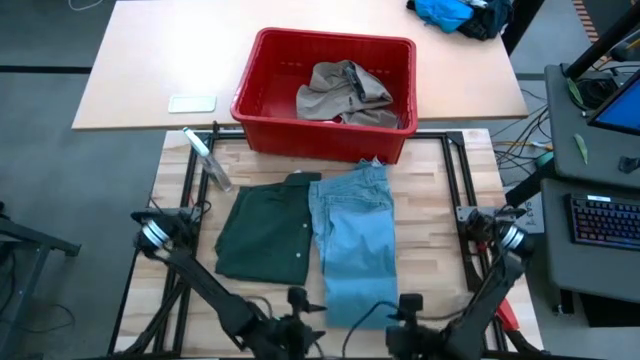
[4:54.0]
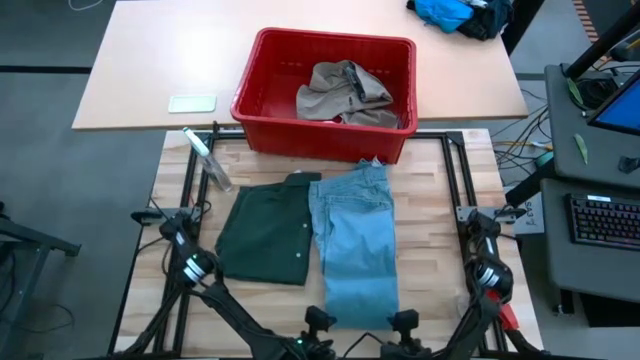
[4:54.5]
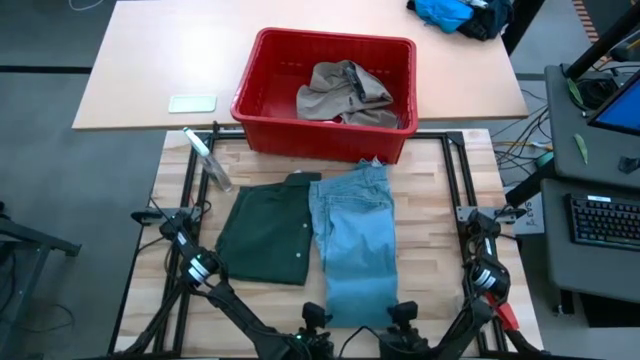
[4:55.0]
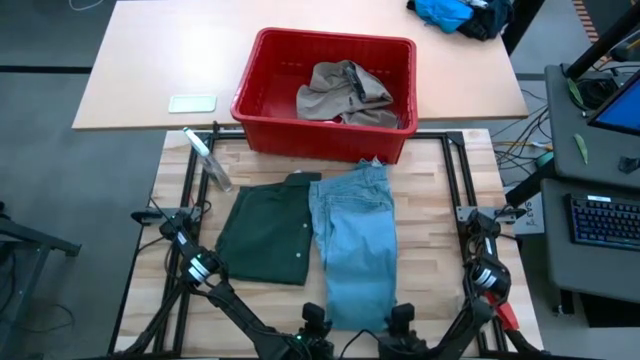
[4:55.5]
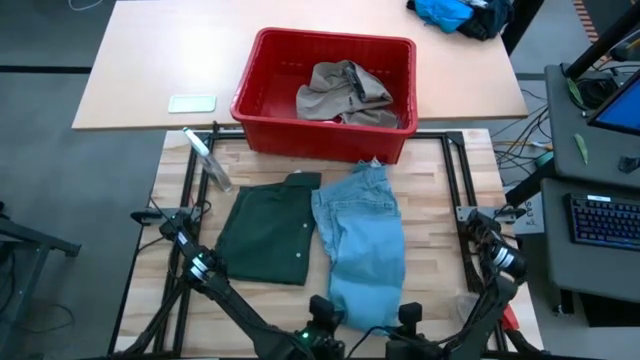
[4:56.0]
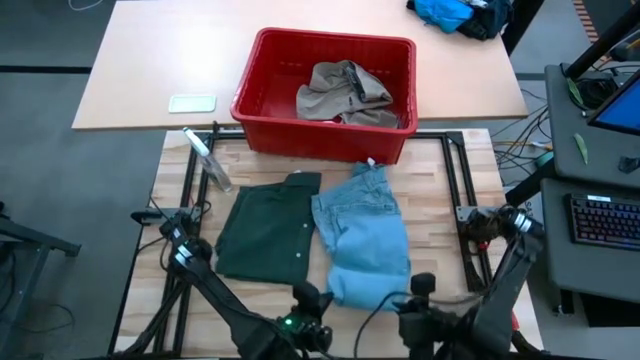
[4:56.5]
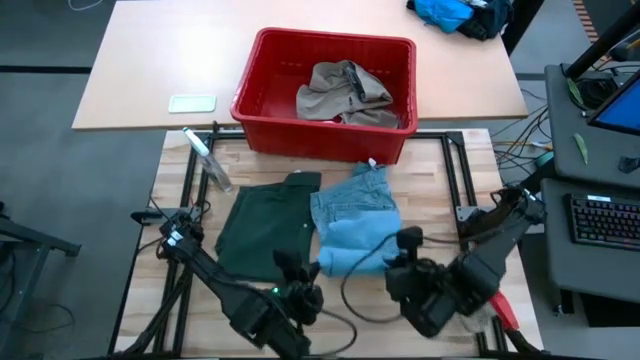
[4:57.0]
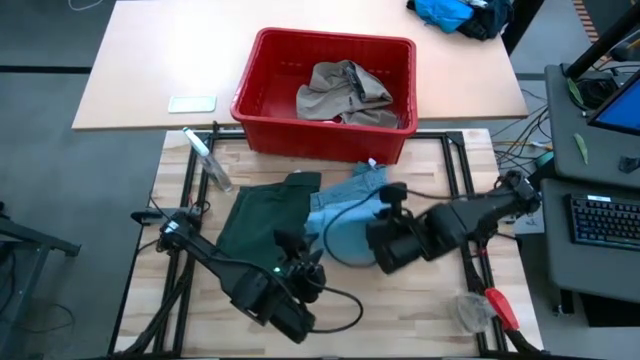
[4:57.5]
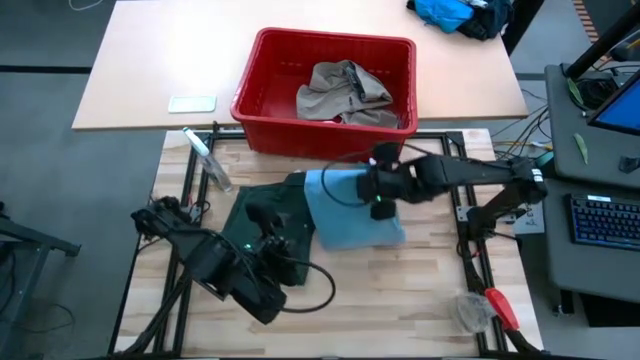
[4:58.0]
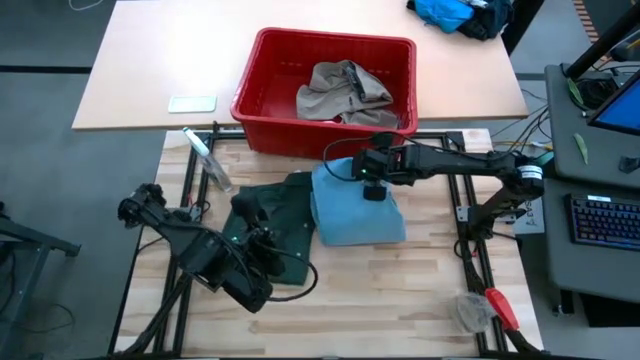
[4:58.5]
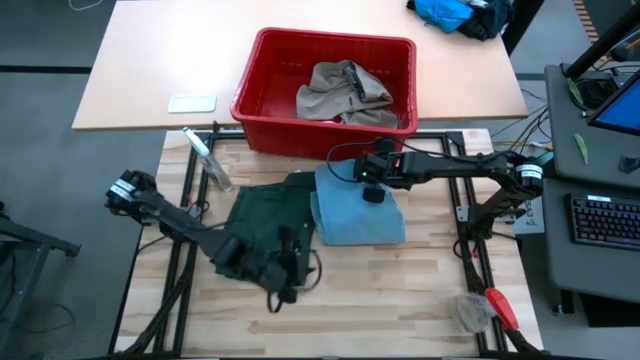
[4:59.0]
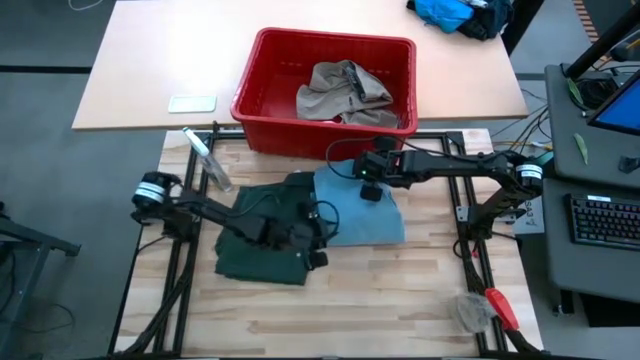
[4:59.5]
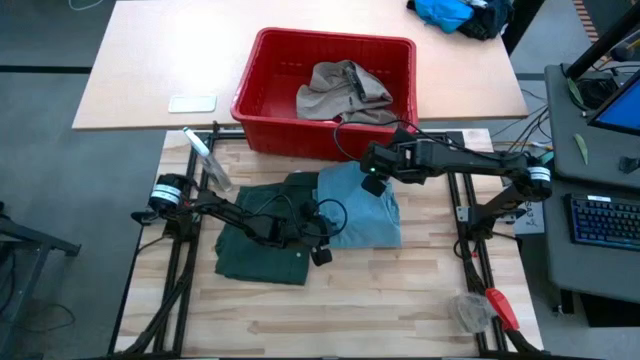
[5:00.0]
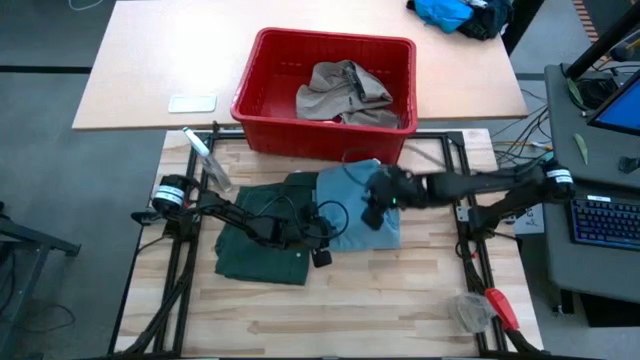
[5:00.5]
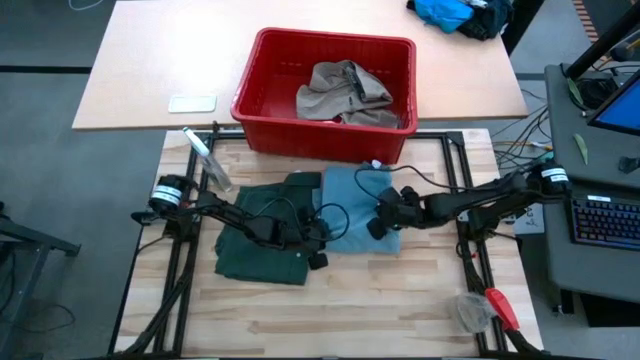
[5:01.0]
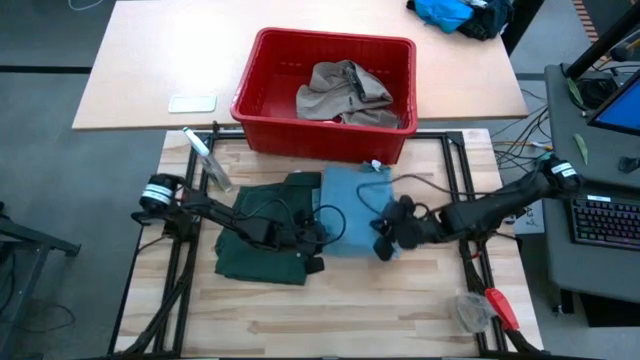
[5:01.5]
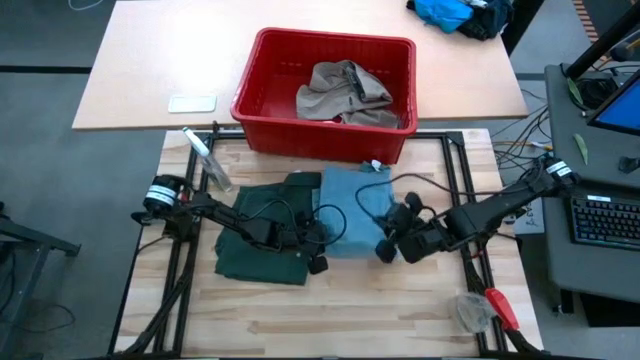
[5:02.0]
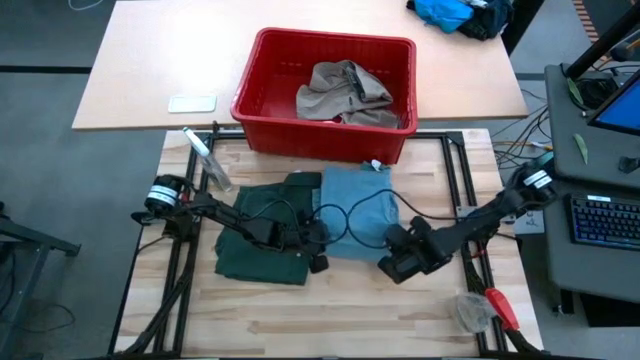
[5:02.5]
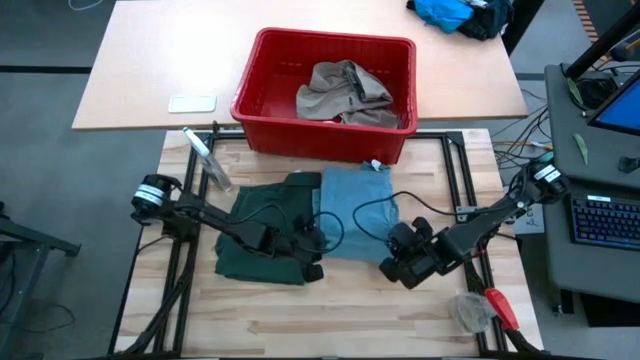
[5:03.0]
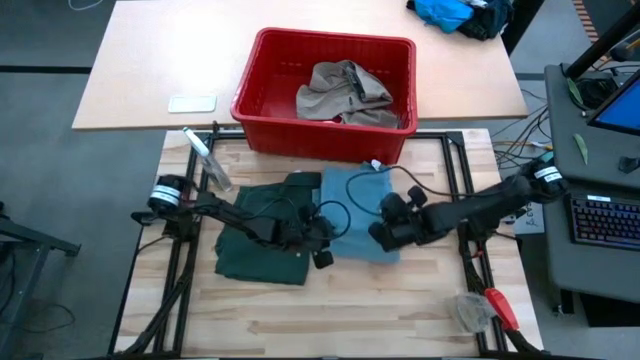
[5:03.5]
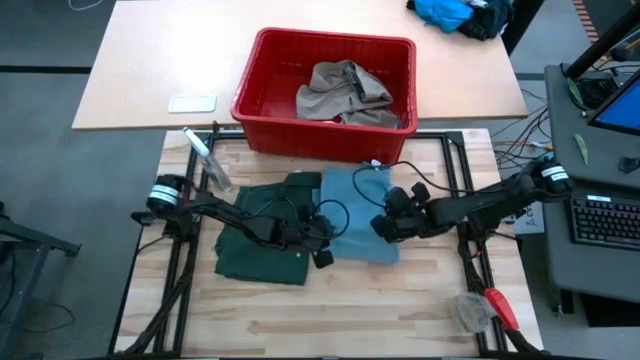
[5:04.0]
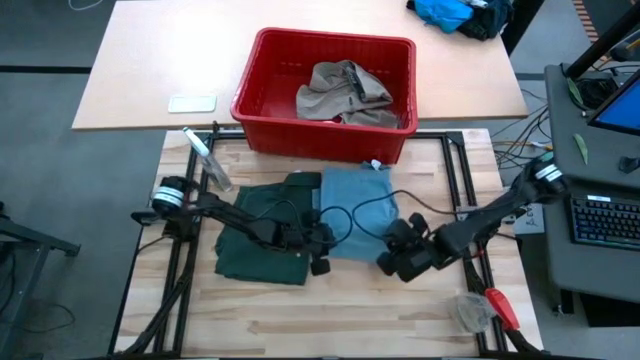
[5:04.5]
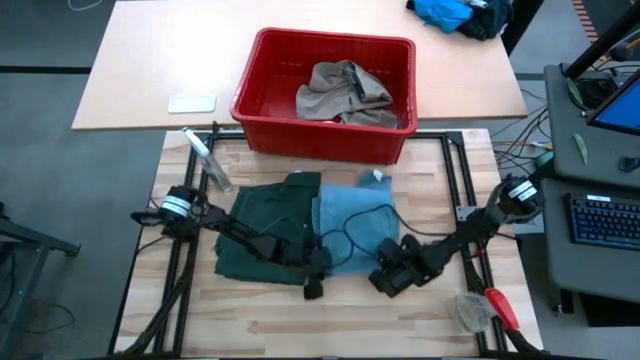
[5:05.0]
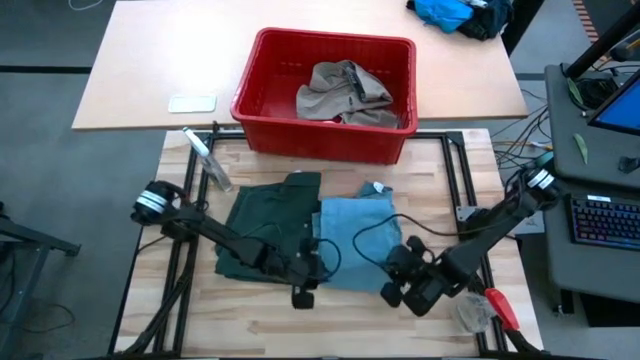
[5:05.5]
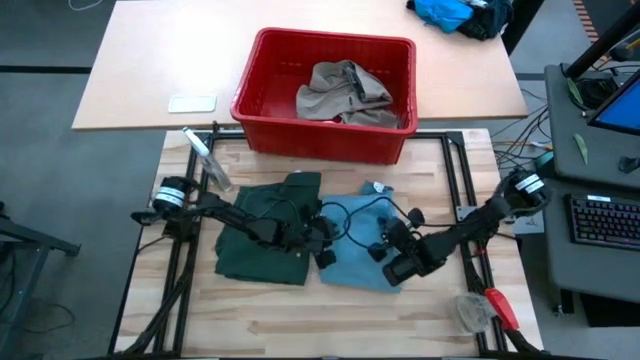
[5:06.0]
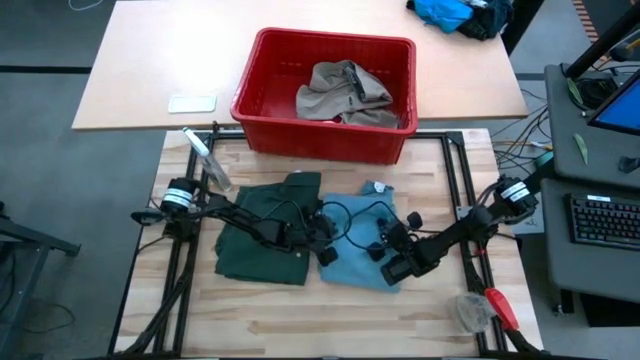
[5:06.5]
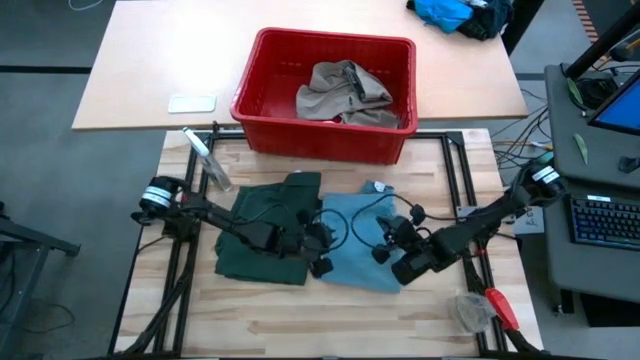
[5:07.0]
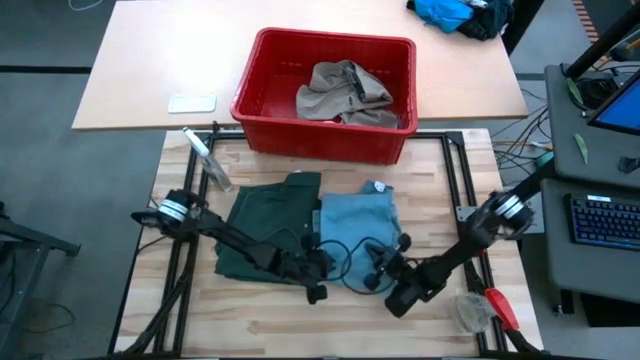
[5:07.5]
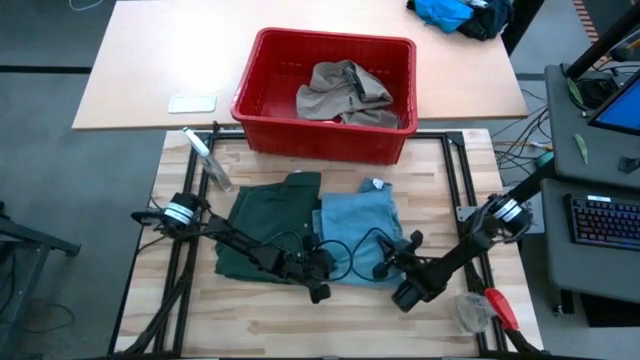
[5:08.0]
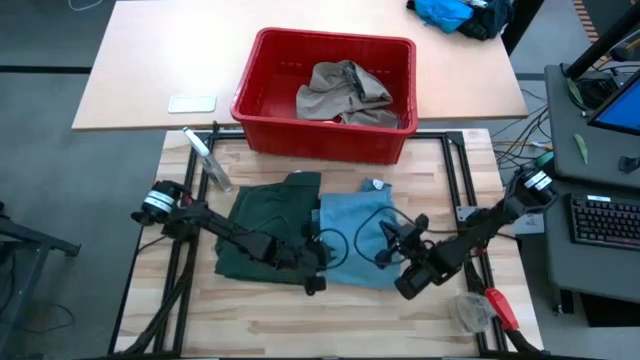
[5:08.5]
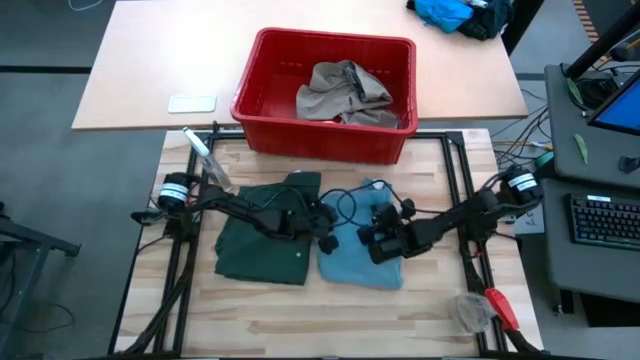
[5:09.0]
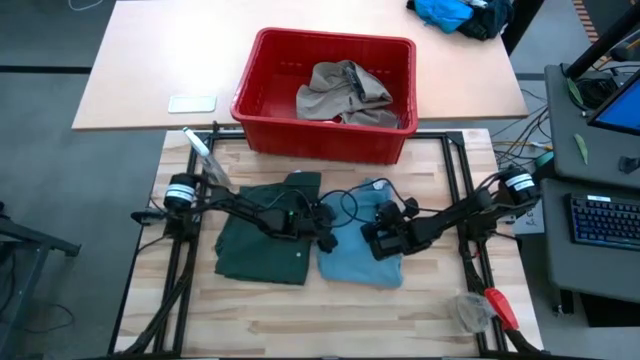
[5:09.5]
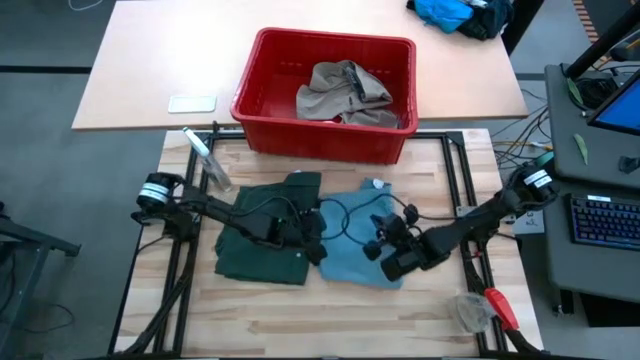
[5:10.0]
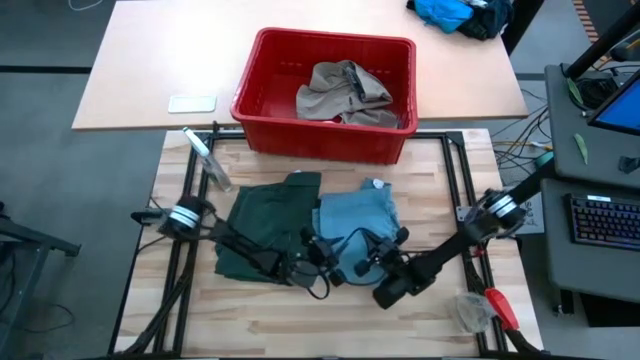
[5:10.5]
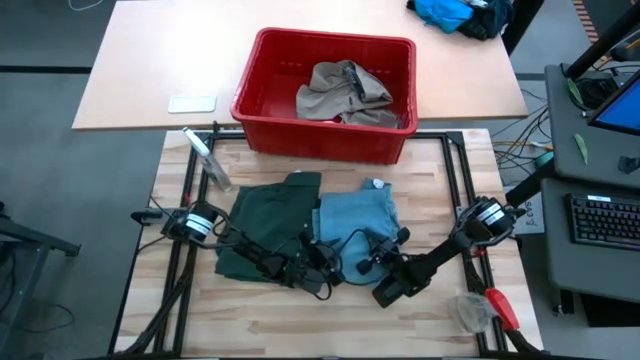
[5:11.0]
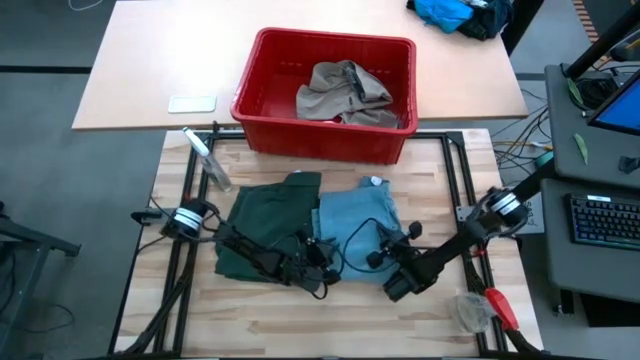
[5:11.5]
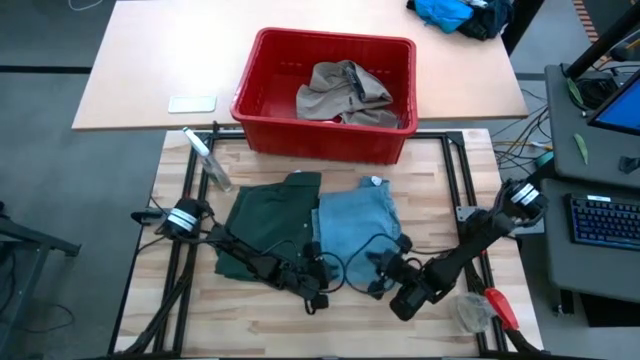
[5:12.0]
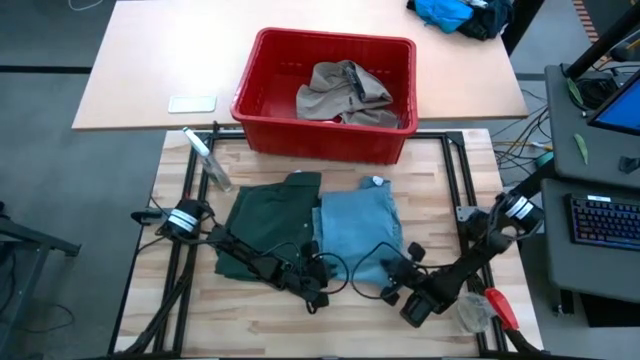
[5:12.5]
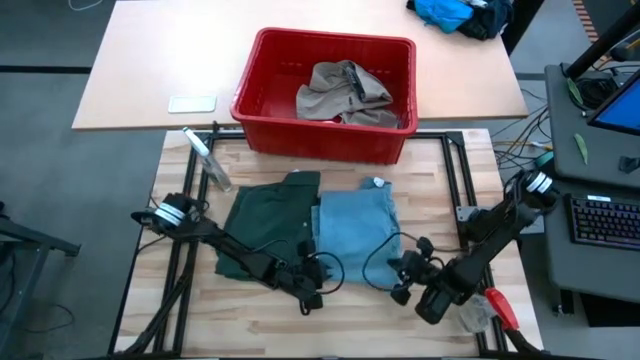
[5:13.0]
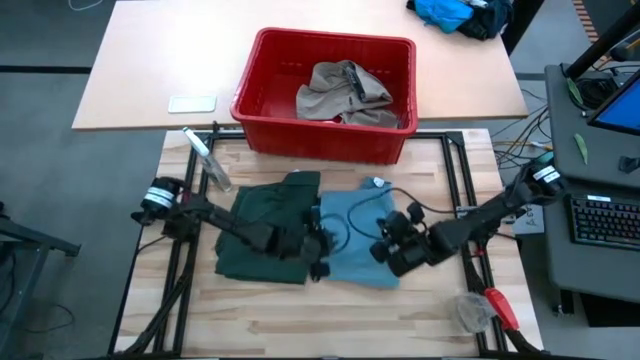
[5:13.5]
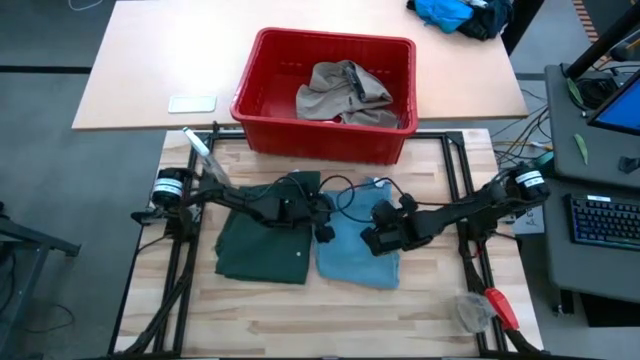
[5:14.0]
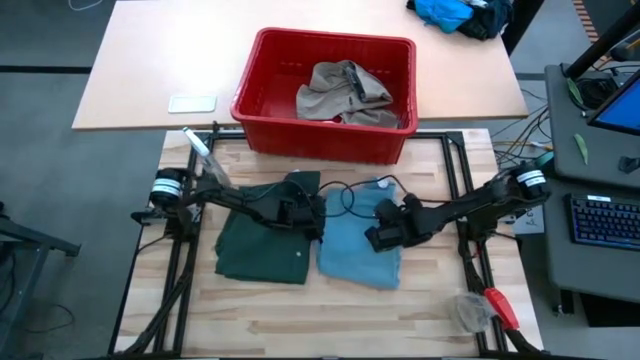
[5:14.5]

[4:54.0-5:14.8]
Task: Fold Laundry from Bin
Fold the blue jeans
